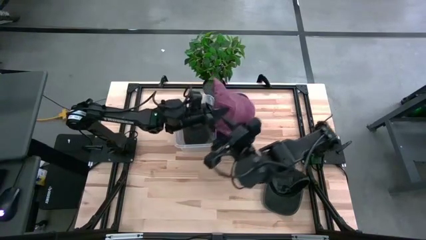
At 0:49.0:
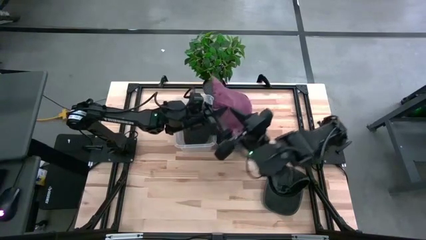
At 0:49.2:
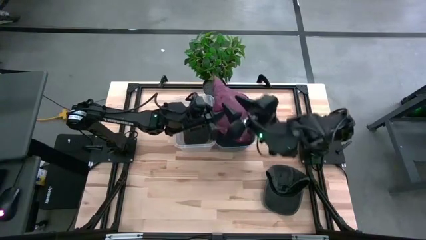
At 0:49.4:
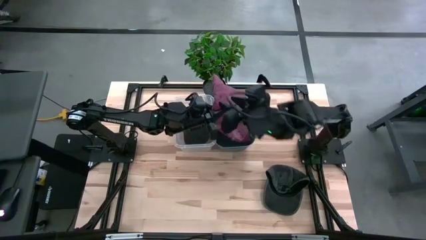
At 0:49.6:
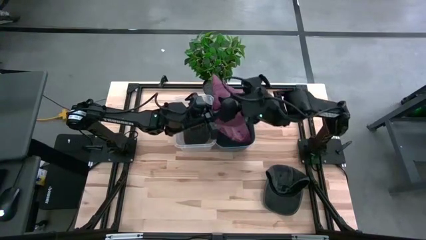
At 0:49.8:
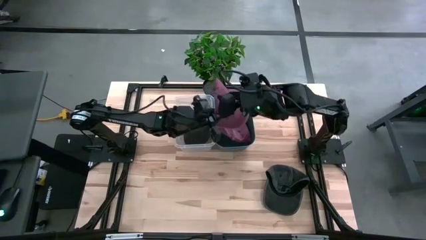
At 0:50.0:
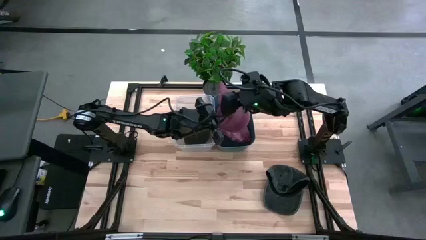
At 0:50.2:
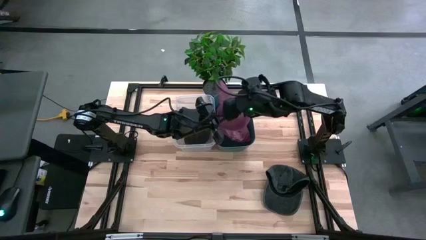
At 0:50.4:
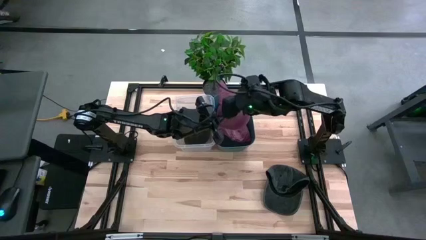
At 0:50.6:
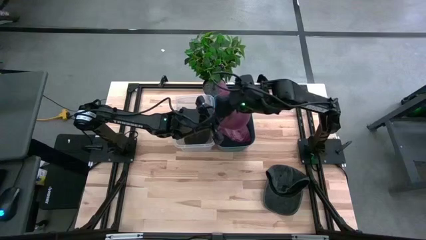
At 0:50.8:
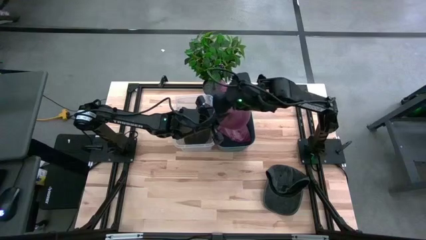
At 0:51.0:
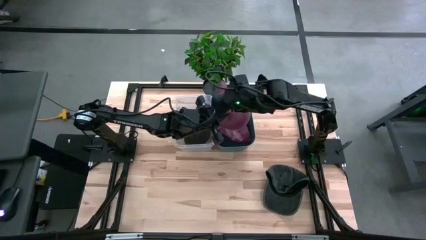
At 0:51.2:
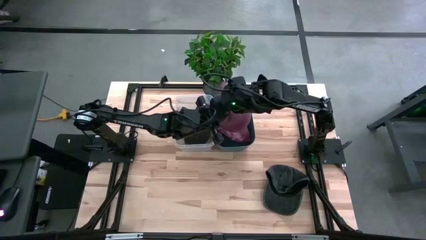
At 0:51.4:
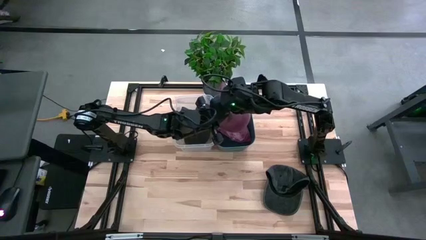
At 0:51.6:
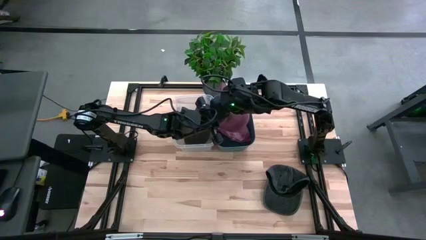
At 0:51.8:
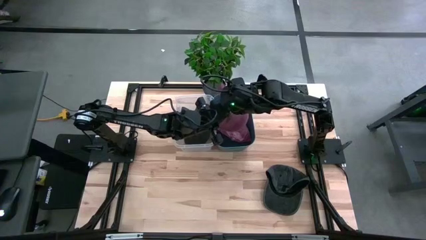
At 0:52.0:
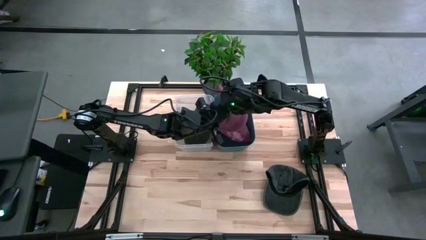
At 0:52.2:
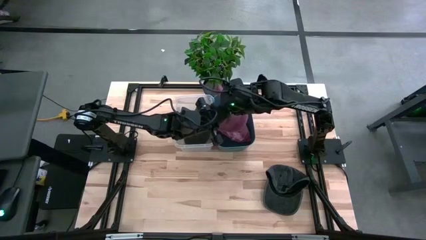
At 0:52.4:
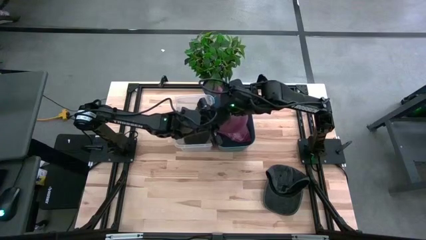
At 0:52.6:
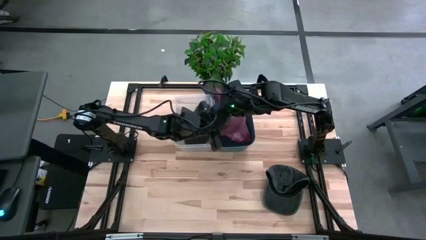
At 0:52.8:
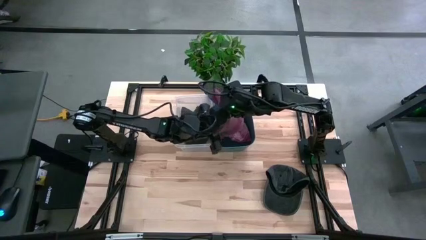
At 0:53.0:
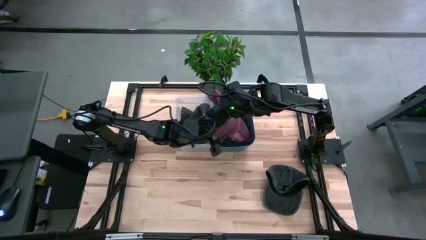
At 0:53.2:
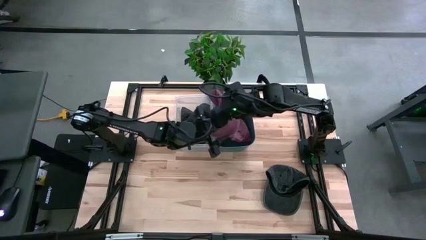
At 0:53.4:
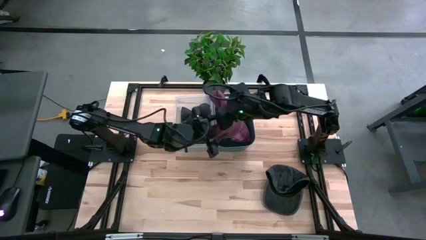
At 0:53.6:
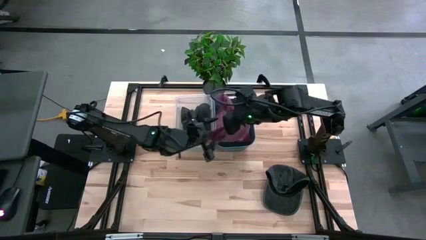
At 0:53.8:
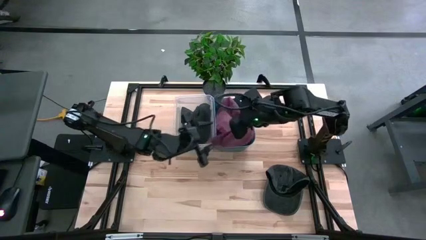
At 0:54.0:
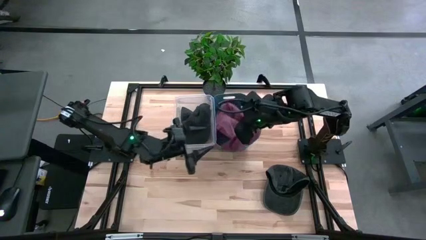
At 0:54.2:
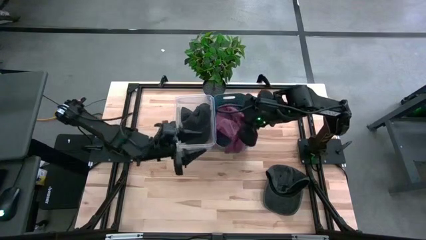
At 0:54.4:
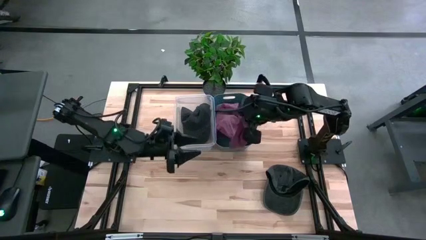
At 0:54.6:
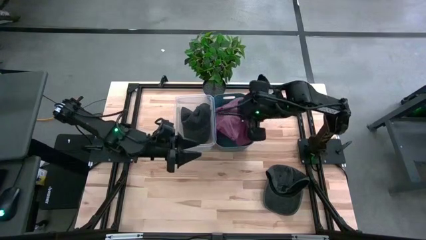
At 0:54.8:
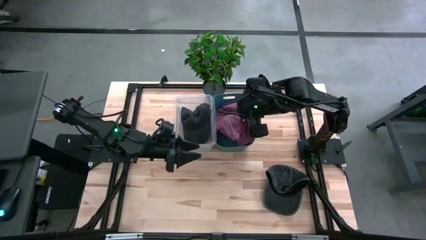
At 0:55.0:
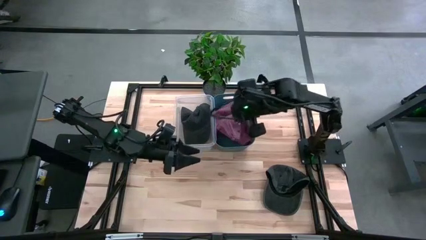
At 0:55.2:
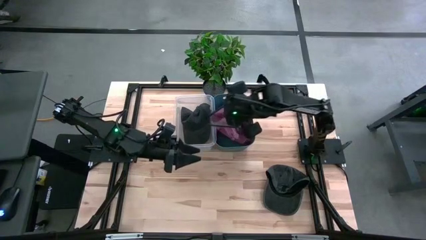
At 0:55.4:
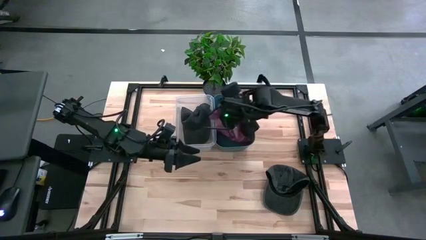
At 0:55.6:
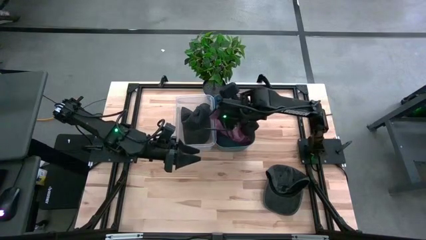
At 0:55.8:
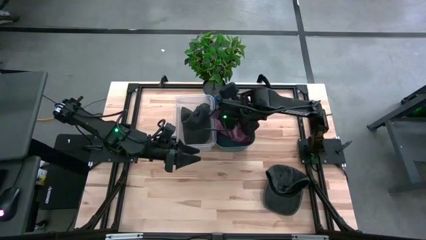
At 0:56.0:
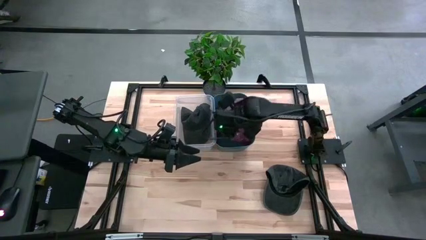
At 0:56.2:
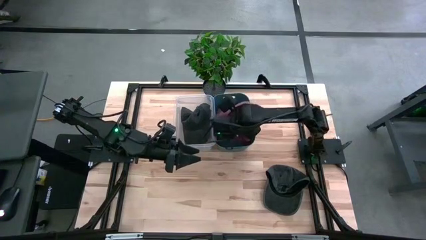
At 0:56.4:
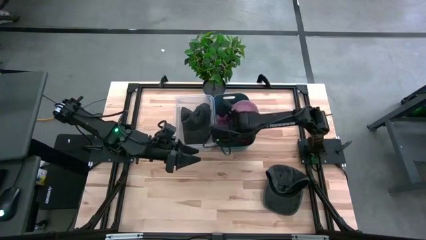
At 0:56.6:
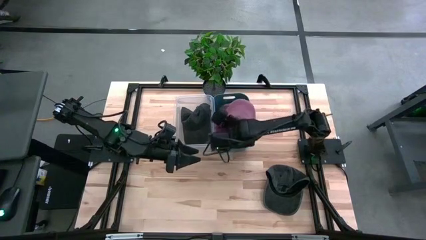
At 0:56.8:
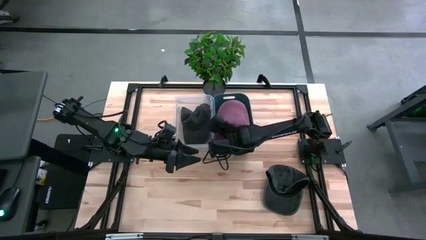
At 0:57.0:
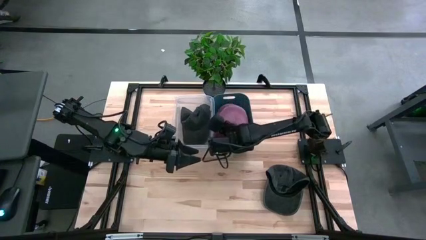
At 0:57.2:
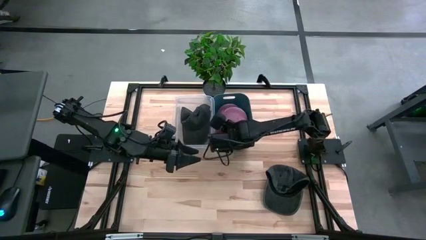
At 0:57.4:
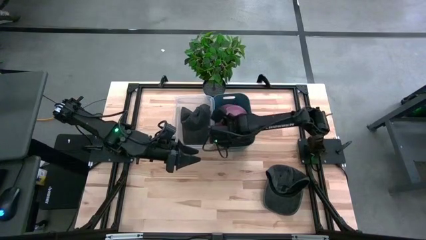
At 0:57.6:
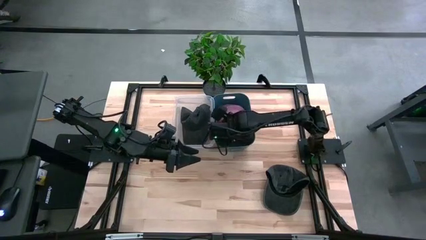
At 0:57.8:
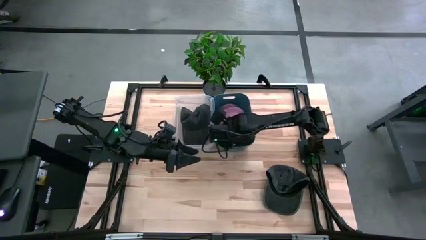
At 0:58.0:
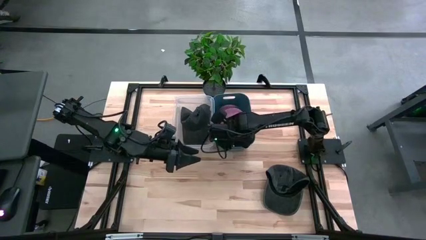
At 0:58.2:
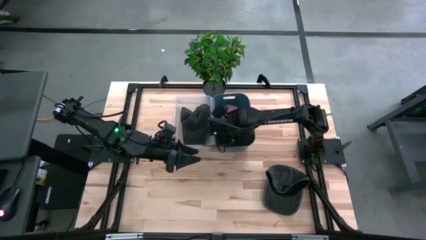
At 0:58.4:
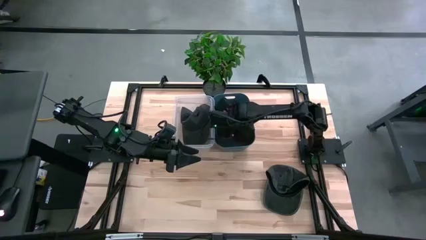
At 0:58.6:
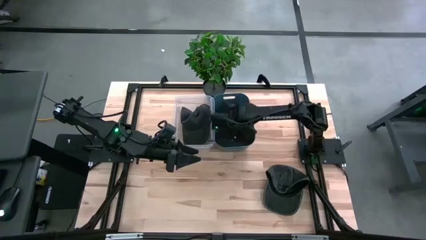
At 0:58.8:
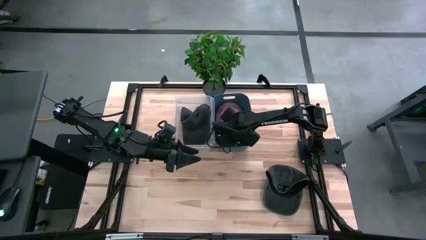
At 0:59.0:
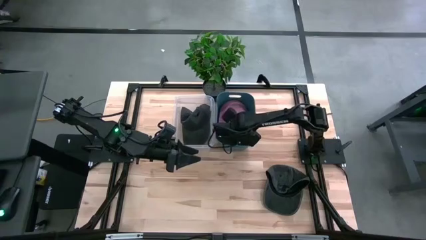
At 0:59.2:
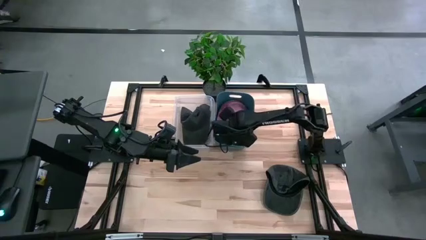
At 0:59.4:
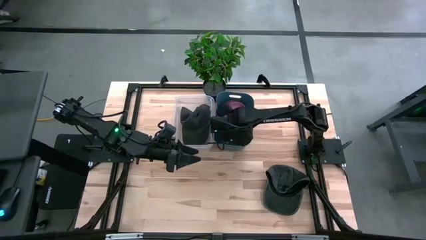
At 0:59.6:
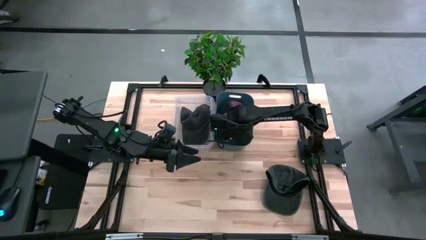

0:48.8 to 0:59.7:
Task: Pick & Place hat
Put the red cap into the blue bin

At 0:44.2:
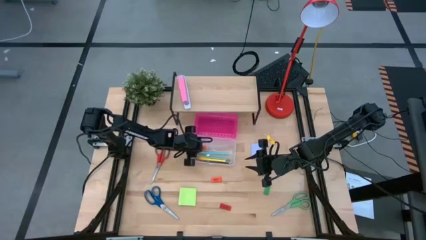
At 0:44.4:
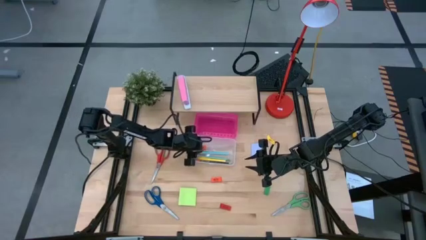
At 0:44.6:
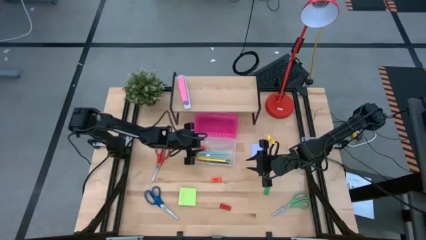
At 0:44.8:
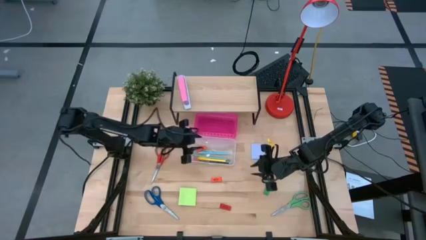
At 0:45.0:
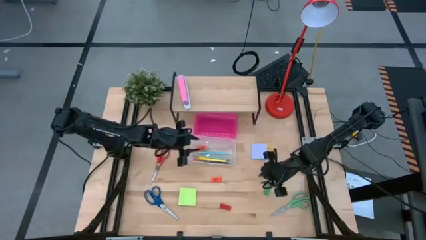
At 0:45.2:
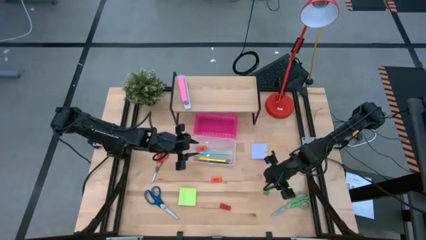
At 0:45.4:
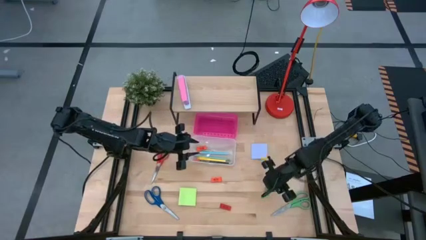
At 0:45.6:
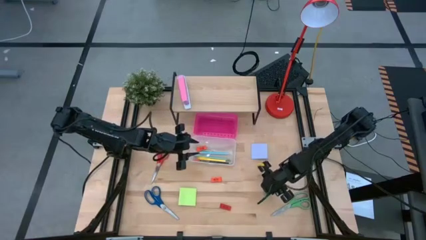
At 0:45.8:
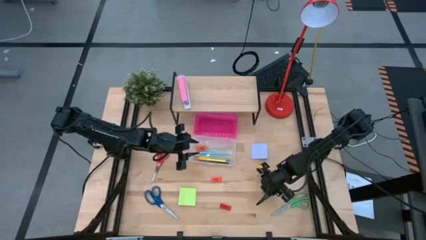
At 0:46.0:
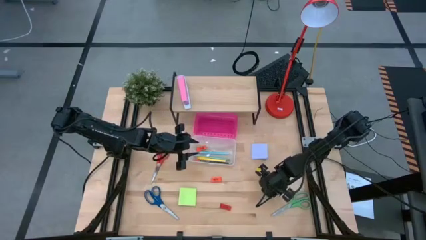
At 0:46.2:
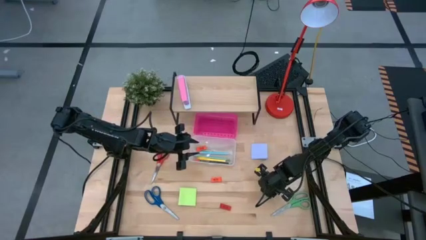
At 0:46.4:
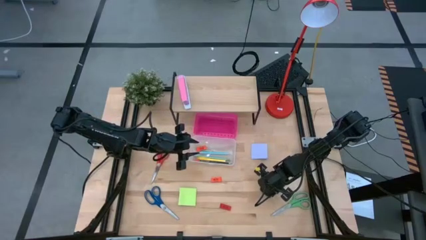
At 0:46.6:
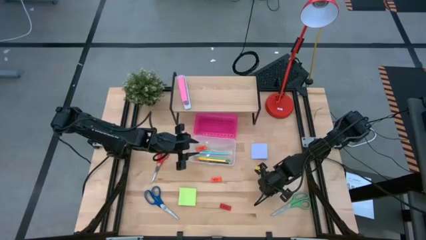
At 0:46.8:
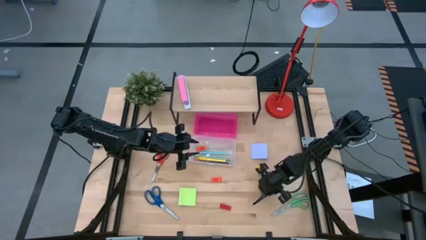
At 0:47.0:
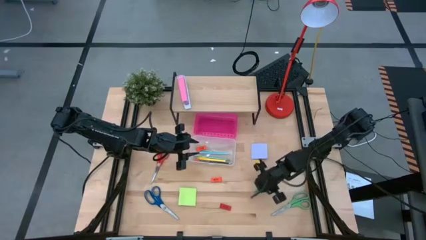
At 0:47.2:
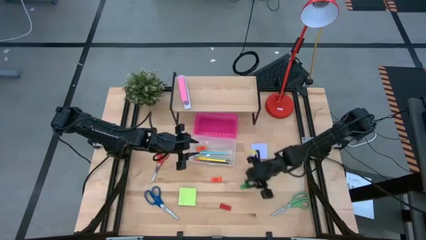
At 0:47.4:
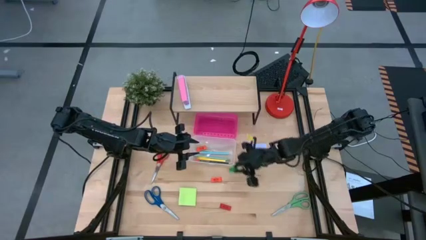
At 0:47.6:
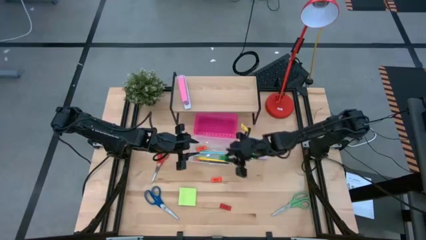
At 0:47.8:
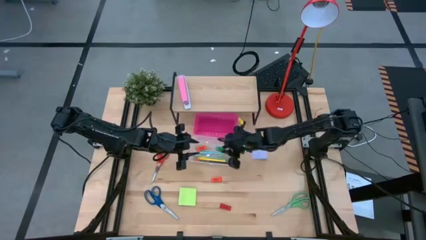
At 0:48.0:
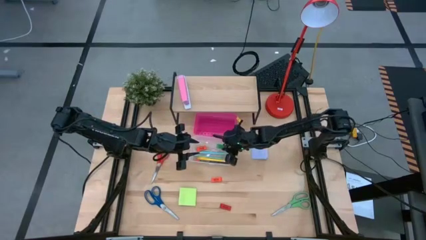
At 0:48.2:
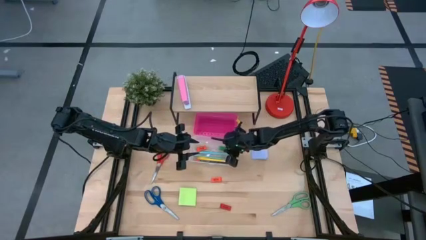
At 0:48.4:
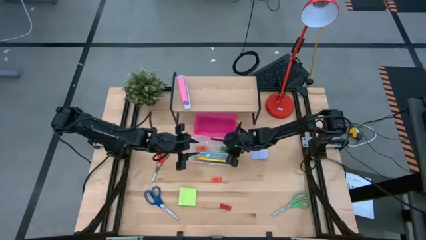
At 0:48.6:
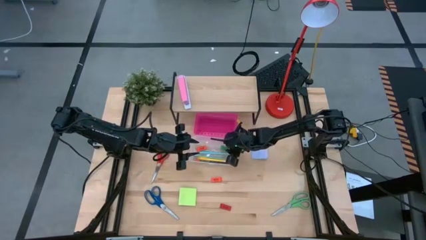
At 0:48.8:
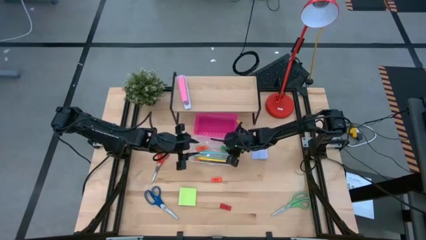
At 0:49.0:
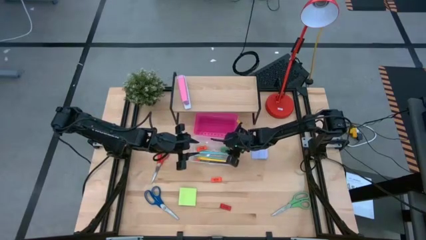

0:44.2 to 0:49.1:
Task: Pack school essentials
Put the green eraser into the supply box
